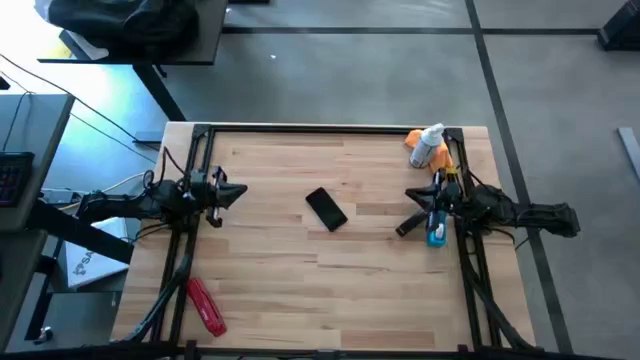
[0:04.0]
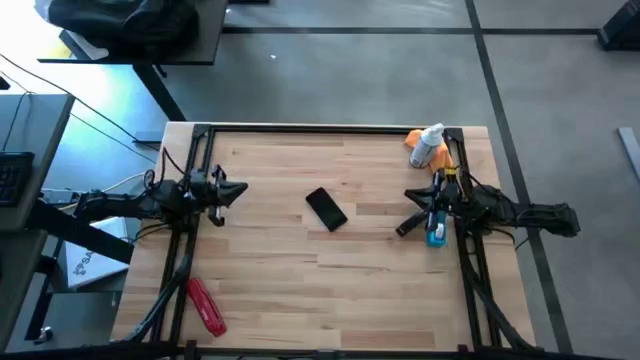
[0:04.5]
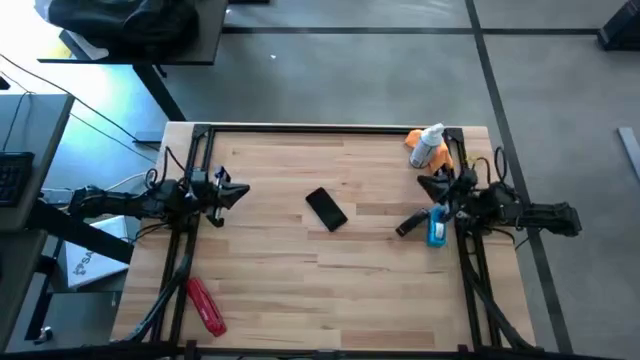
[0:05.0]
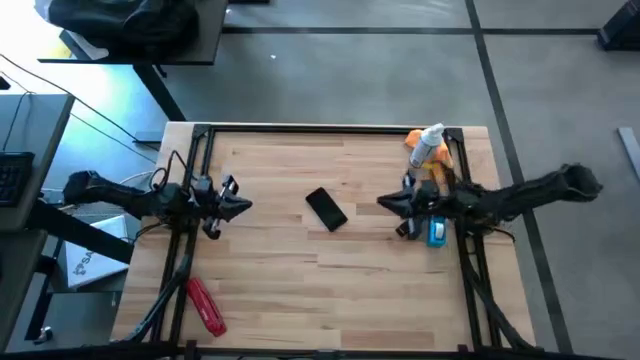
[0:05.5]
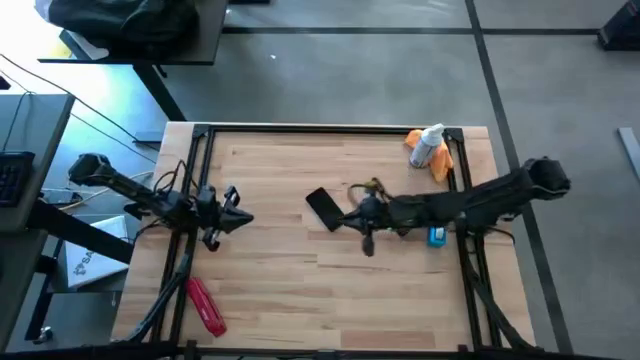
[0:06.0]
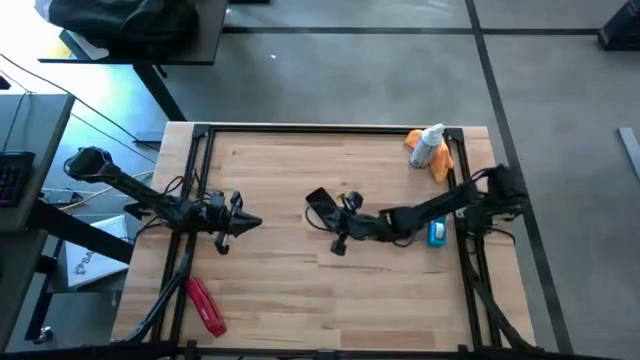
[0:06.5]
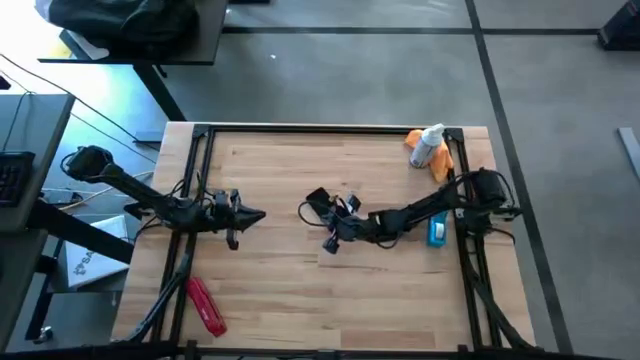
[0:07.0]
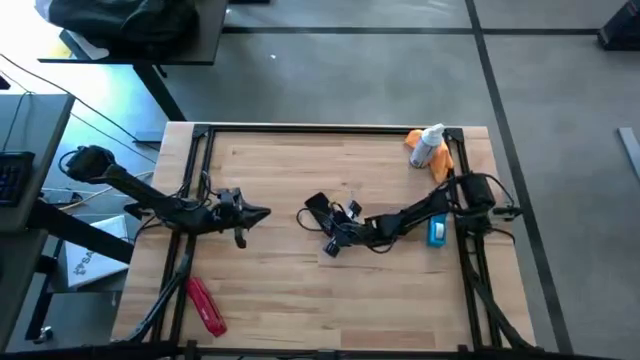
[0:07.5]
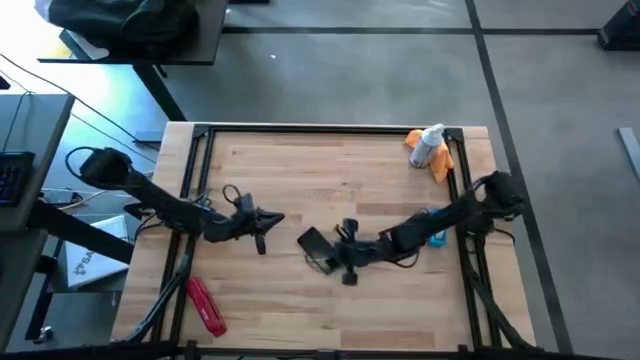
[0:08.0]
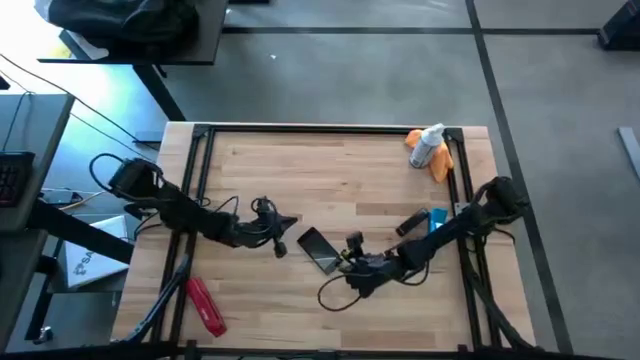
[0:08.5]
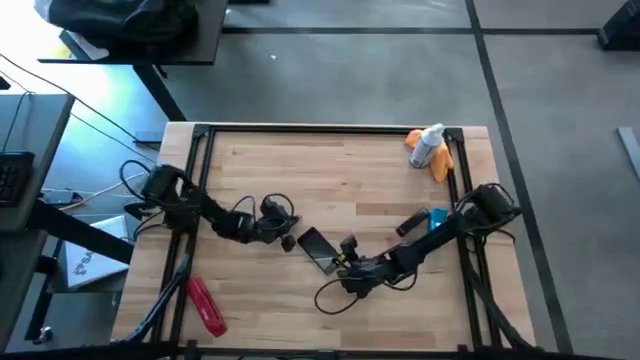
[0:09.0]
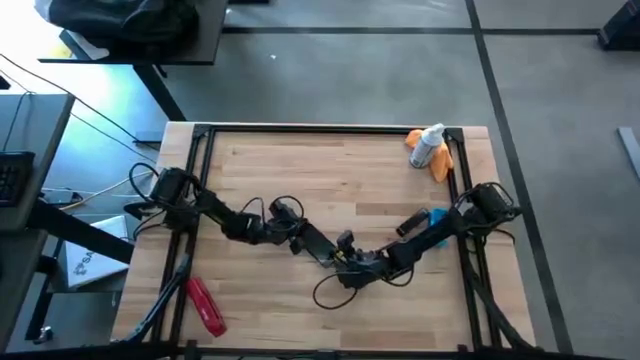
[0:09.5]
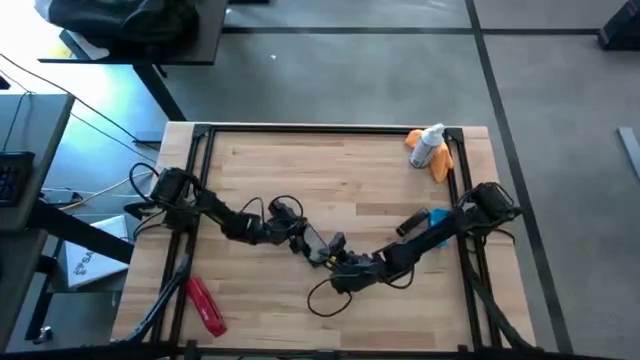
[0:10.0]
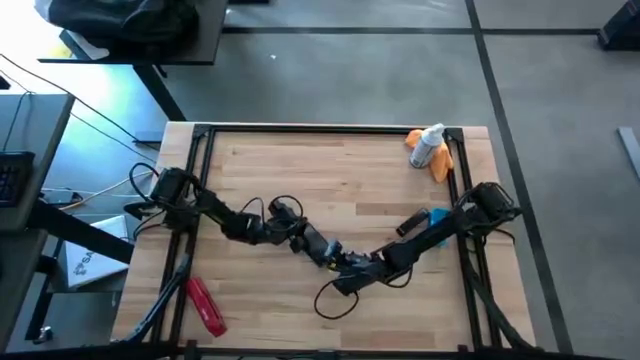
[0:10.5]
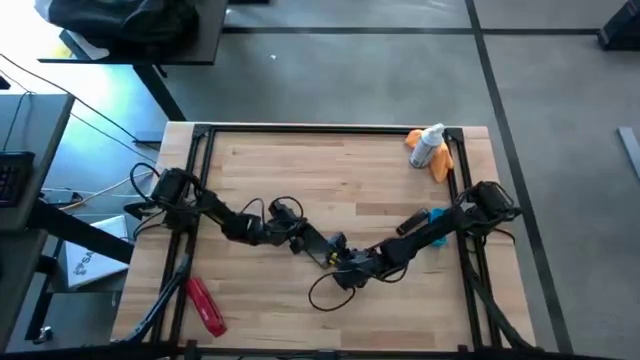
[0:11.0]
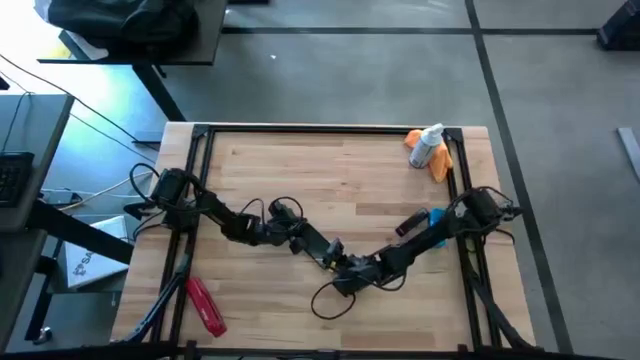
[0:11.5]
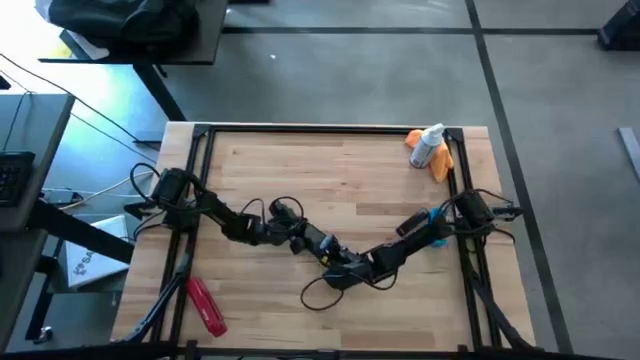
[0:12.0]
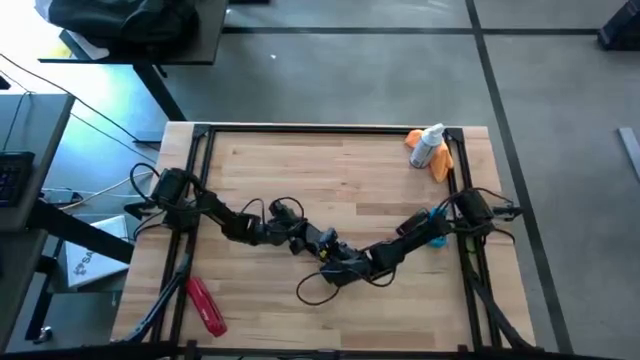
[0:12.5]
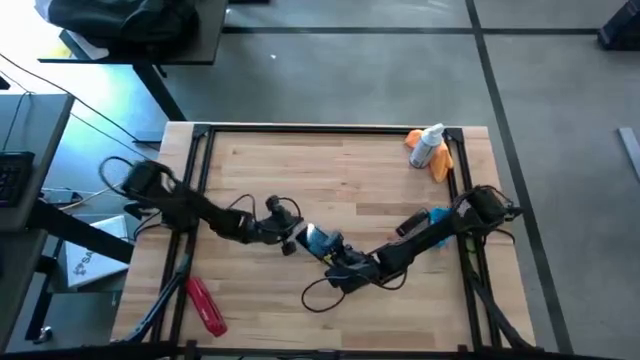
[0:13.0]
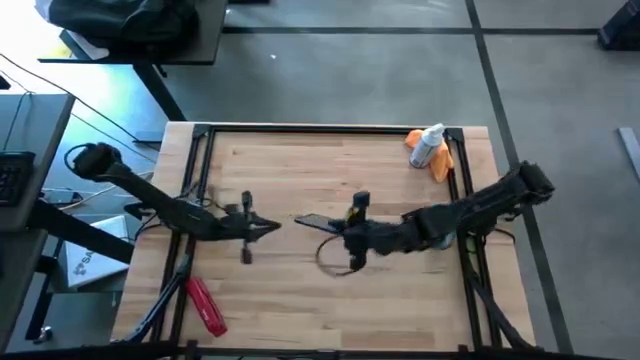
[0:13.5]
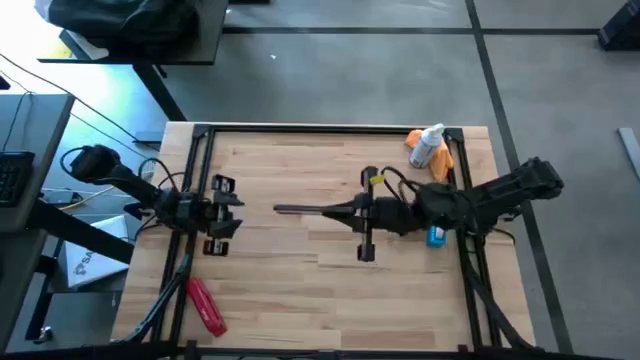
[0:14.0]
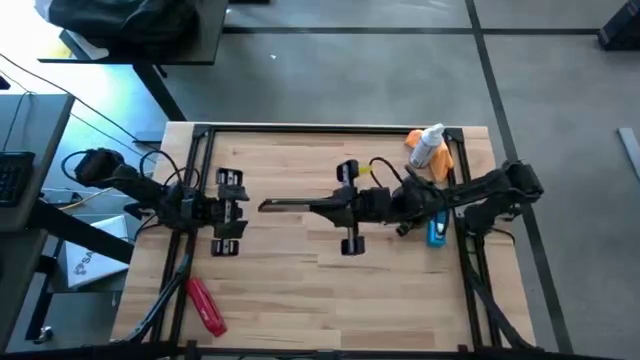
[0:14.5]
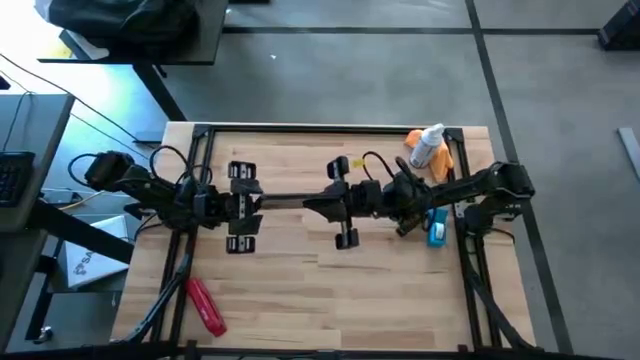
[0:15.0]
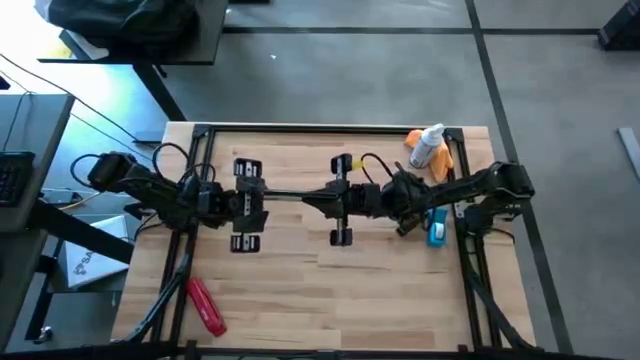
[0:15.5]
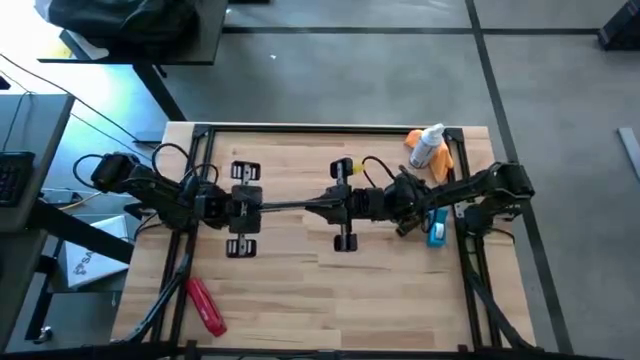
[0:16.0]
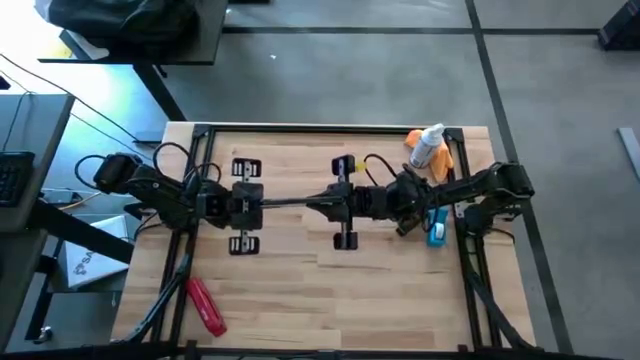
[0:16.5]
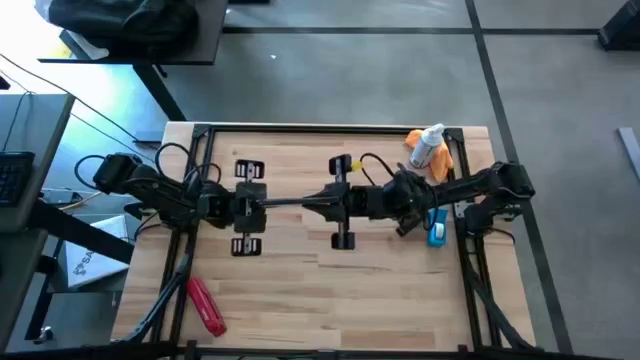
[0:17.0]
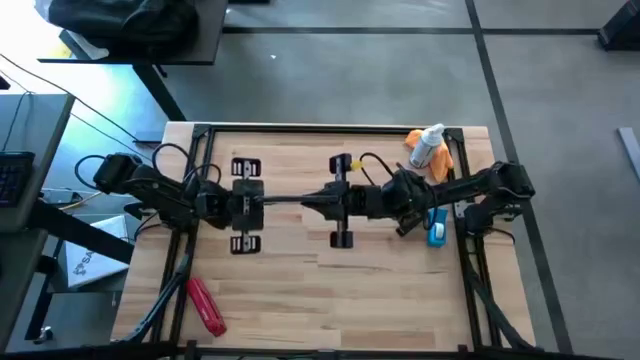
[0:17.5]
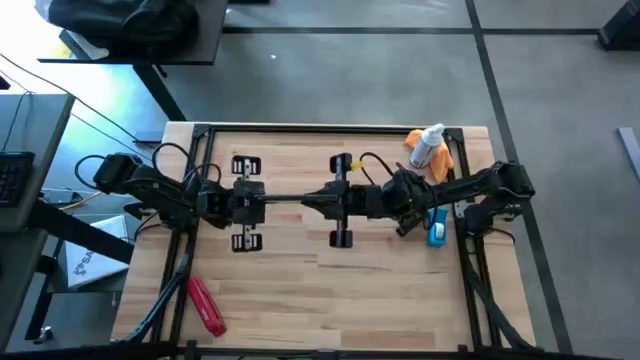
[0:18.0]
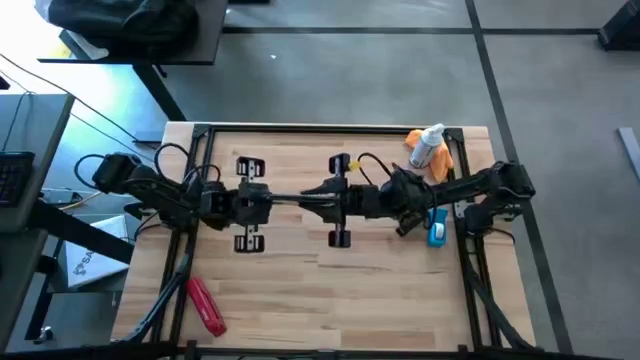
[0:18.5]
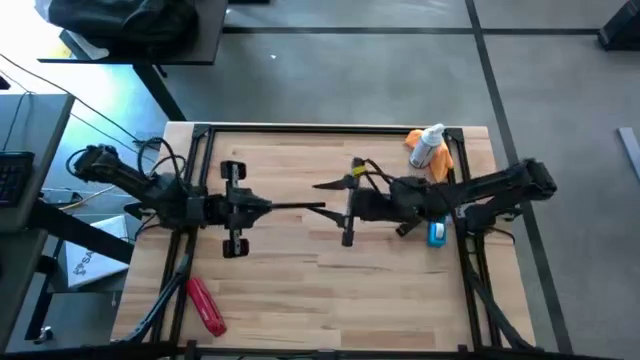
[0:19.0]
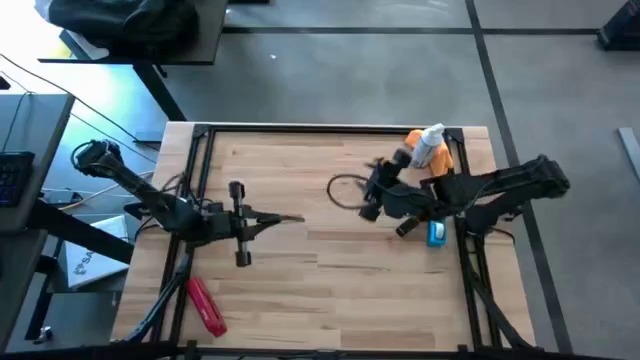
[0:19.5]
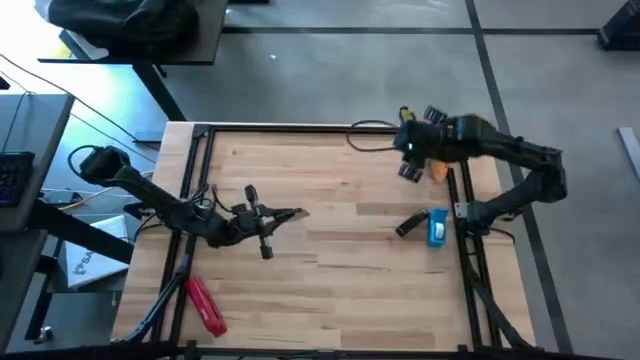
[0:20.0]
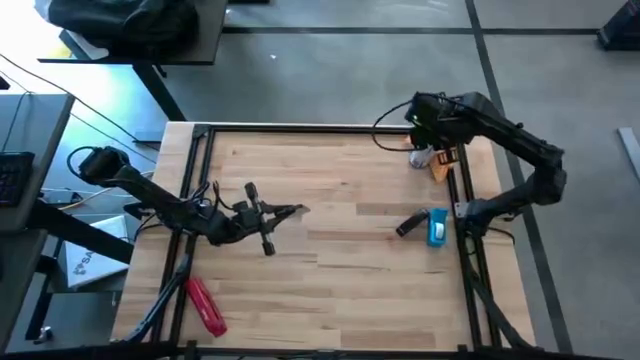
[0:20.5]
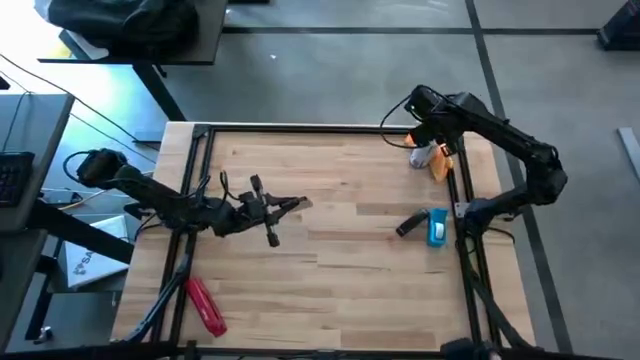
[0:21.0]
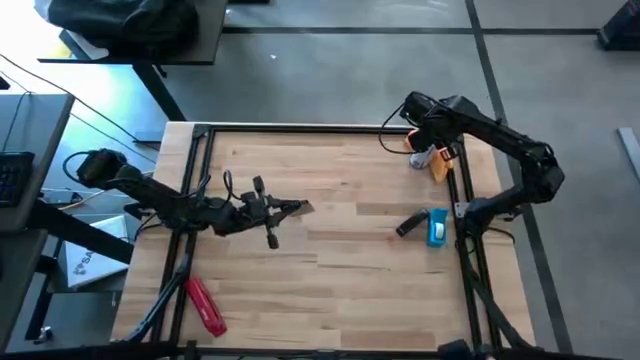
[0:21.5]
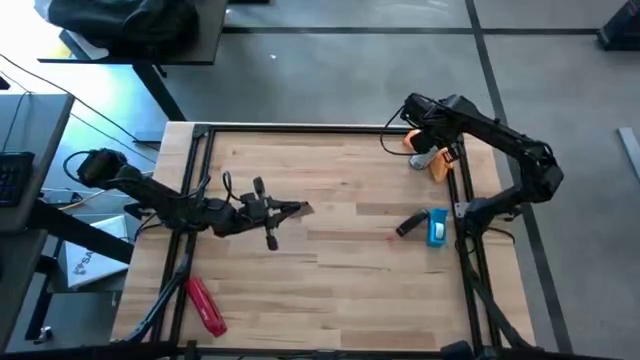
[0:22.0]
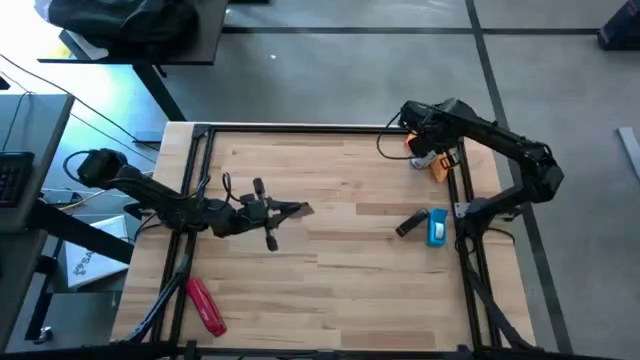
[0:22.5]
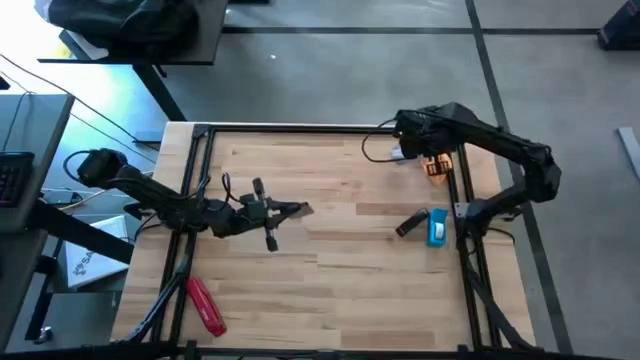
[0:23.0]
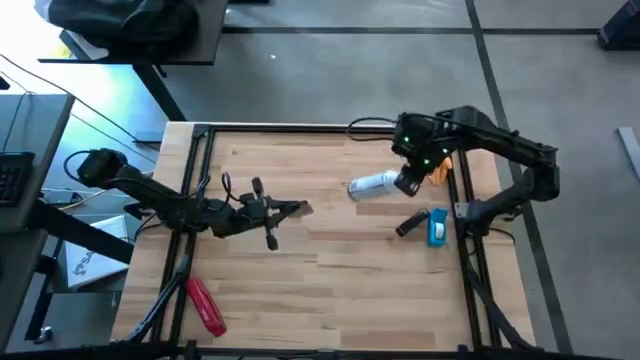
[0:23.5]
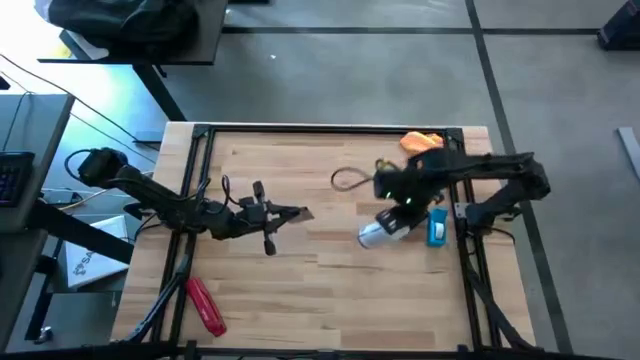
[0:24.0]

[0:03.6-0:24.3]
Task: Apply microfiber cloth
Spray the cellphone using the spray bottle
